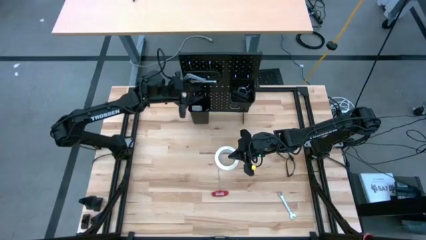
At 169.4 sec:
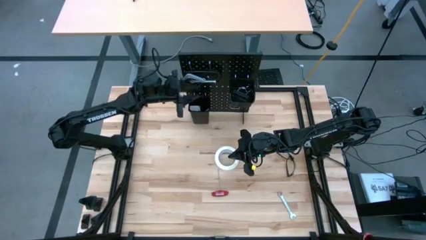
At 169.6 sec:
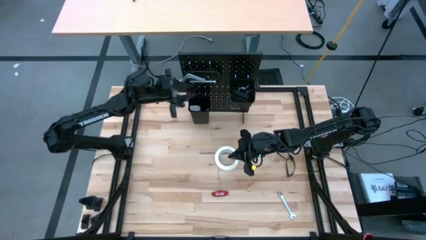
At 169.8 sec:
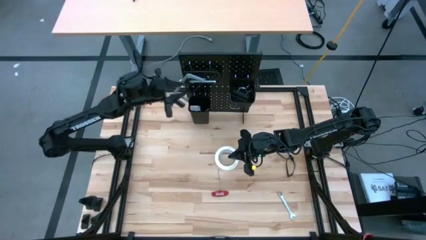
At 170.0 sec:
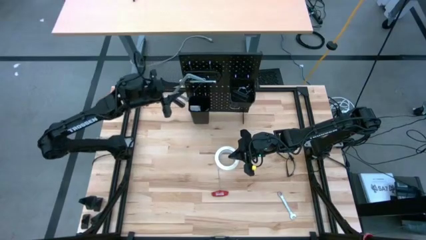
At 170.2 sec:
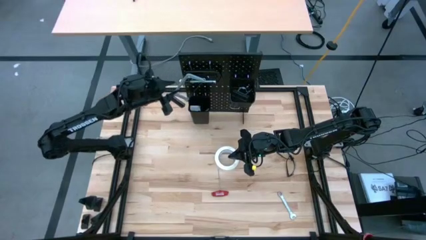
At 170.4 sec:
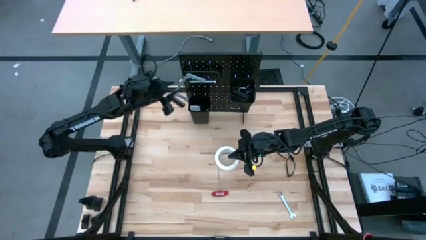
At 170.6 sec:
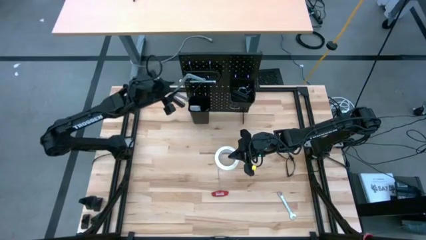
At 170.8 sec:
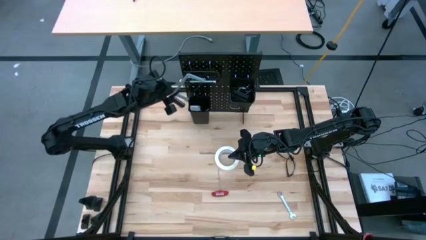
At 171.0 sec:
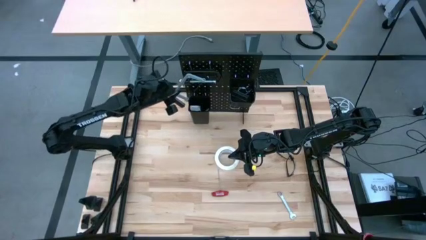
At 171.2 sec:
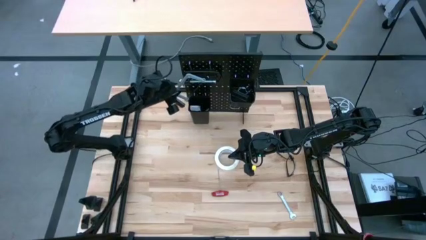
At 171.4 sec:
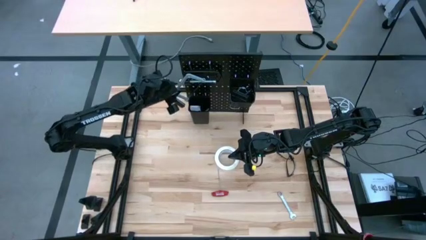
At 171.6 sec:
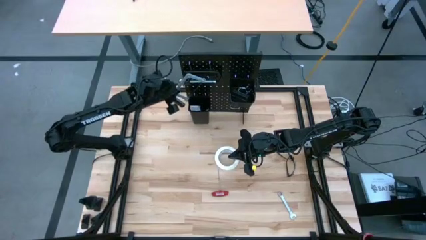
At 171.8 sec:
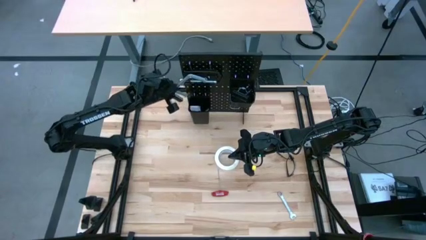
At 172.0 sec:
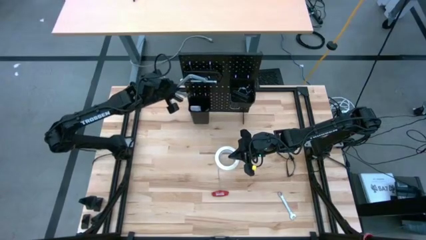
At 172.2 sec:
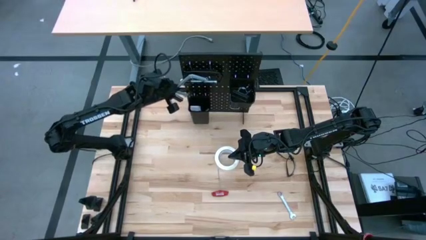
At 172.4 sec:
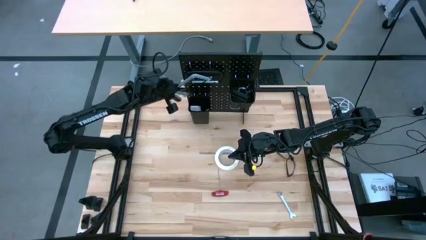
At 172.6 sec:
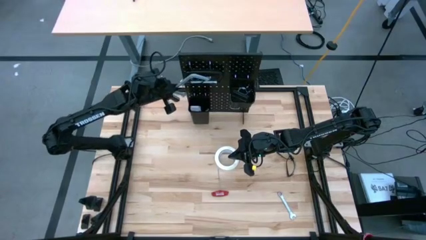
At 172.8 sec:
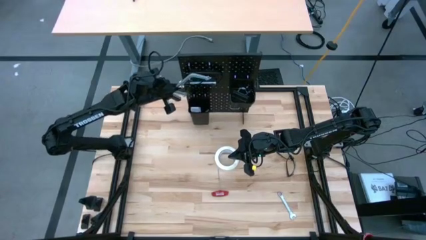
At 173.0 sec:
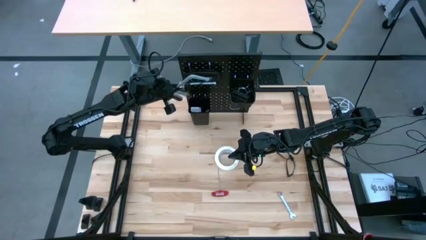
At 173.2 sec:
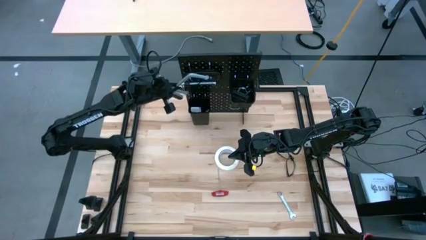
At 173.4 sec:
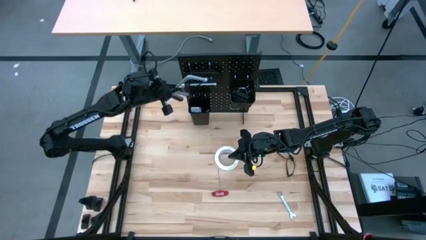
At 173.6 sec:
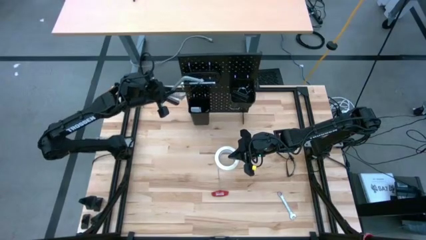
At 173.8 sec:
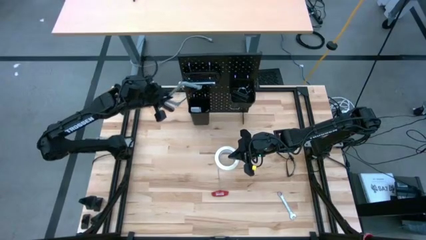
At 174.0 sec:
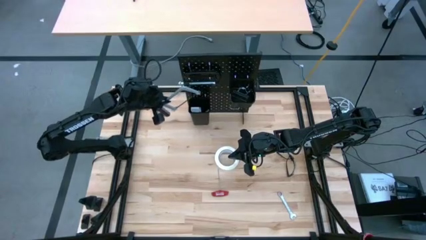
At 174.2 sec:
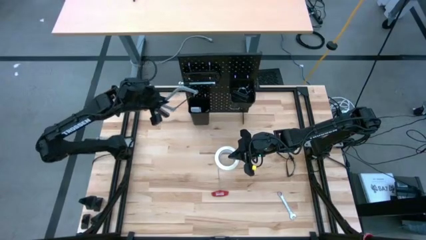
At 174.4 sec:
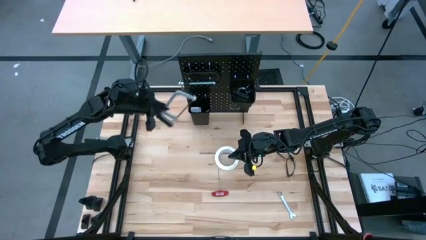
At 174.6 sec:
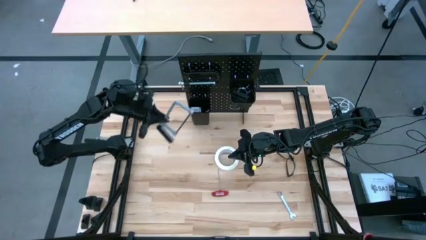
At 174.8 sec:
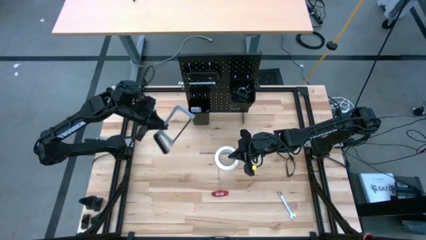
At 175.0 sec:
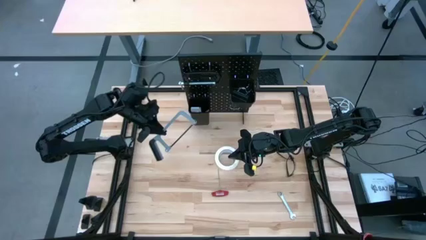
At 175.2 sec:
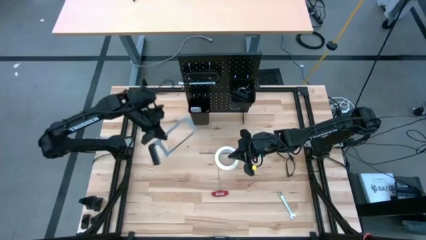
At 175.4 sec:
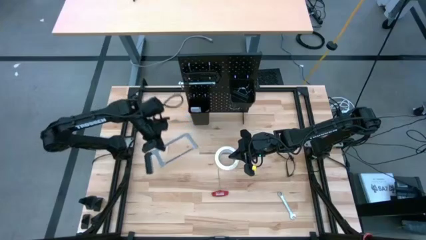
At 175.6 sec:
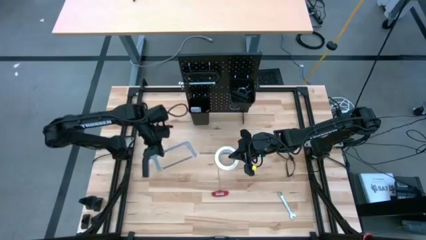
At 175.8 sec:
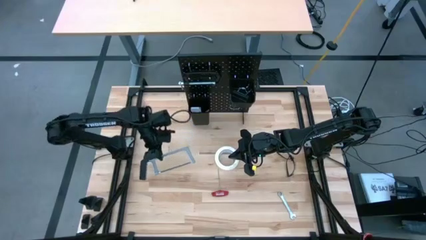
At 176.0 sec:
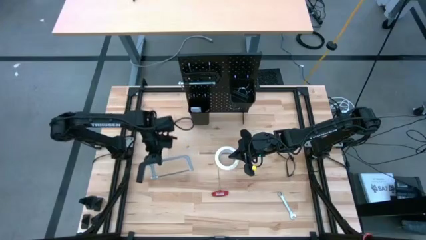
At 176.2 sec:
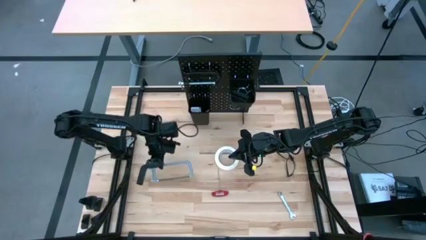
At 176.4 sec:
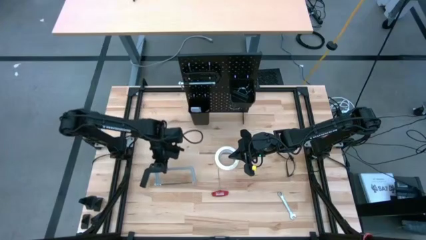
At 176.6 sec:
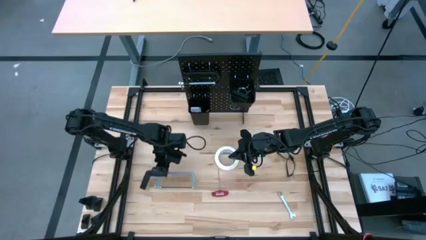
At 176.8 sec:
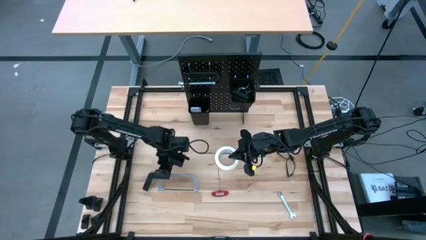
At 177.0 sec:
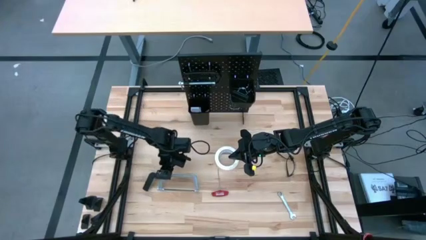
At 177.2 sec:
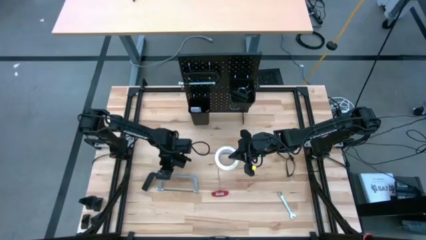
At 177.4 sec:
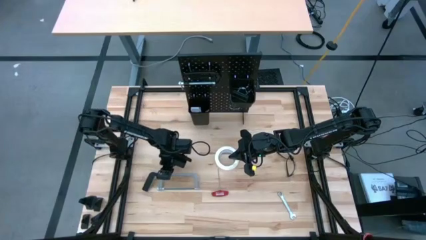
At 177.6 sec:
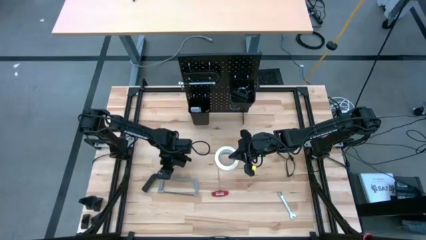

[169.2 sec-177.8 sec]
Task: Hang tools onto peg board
Unhang the gray hacksaw from the black peg board

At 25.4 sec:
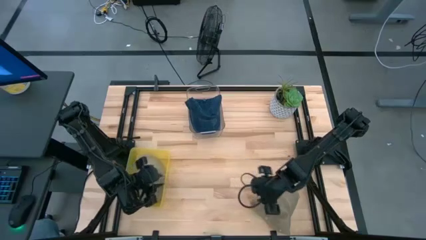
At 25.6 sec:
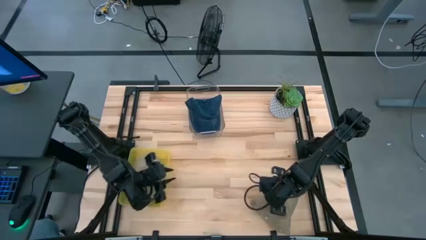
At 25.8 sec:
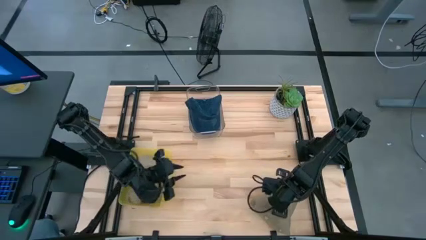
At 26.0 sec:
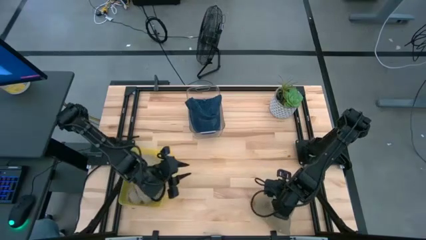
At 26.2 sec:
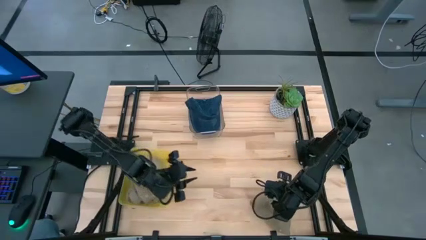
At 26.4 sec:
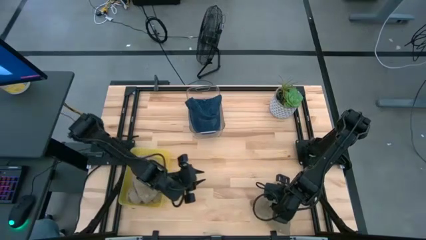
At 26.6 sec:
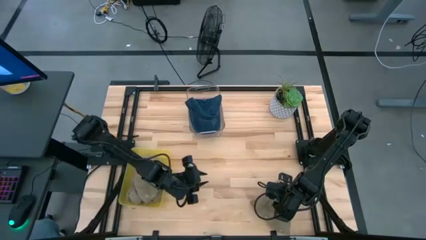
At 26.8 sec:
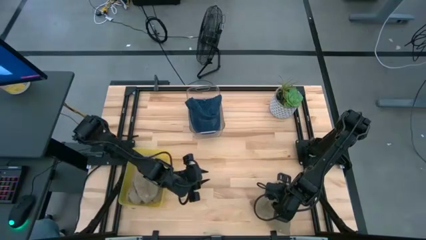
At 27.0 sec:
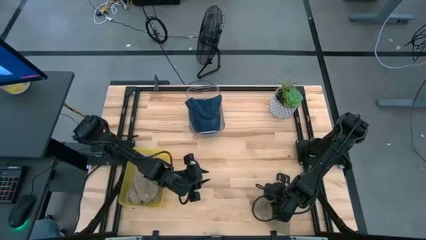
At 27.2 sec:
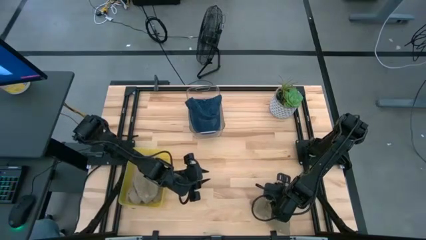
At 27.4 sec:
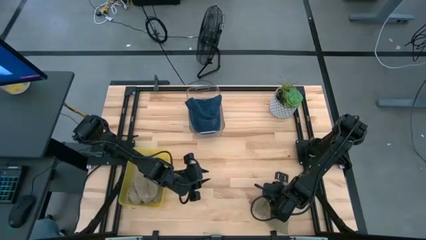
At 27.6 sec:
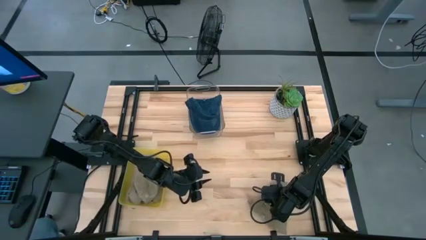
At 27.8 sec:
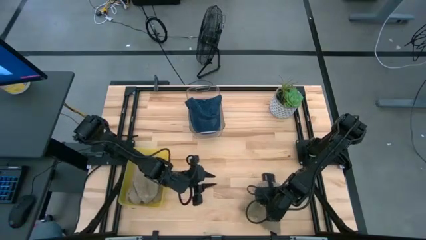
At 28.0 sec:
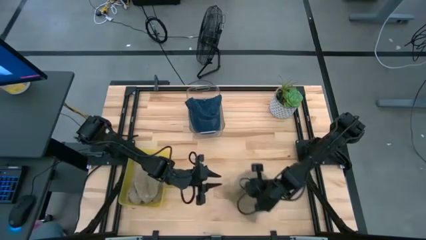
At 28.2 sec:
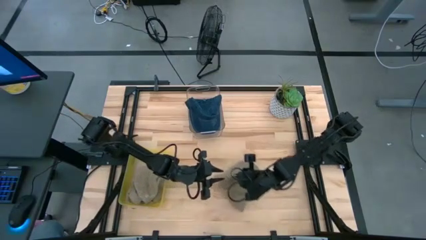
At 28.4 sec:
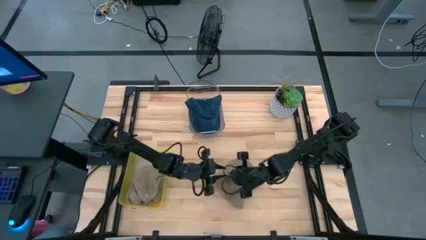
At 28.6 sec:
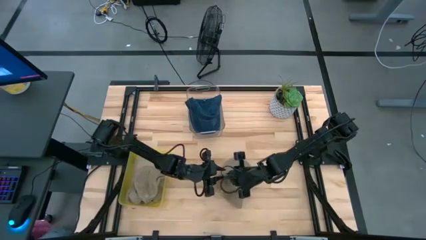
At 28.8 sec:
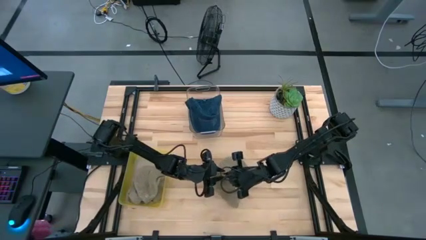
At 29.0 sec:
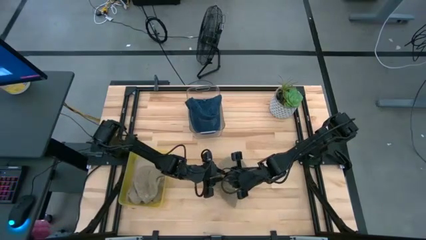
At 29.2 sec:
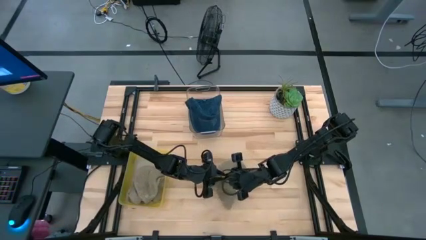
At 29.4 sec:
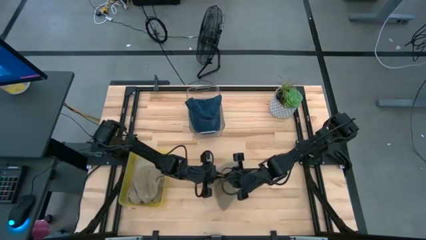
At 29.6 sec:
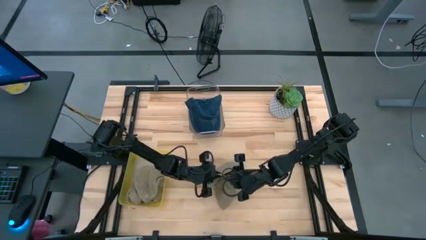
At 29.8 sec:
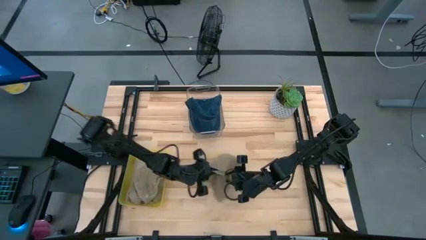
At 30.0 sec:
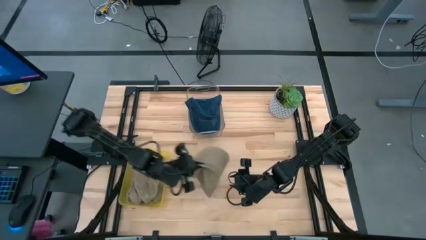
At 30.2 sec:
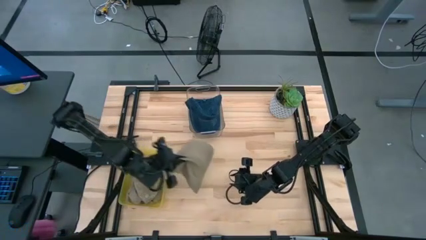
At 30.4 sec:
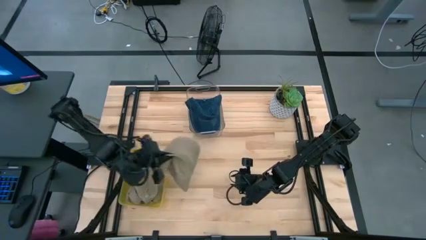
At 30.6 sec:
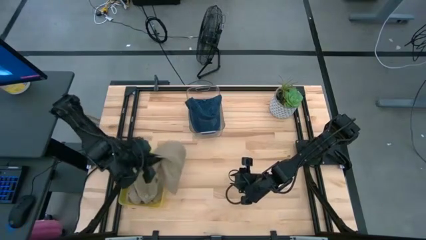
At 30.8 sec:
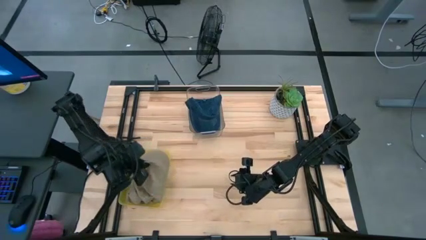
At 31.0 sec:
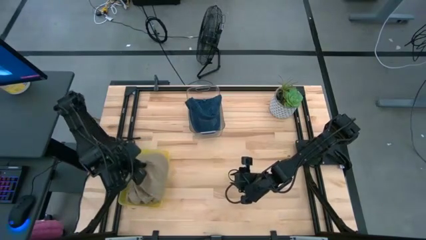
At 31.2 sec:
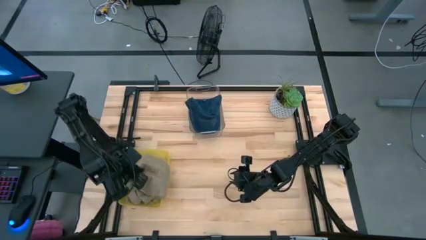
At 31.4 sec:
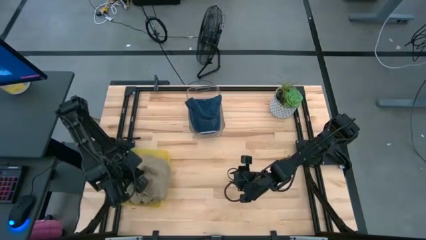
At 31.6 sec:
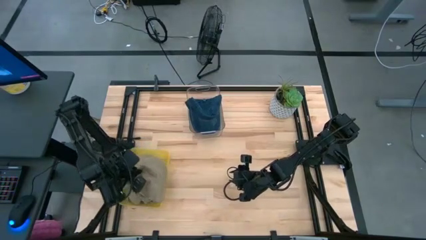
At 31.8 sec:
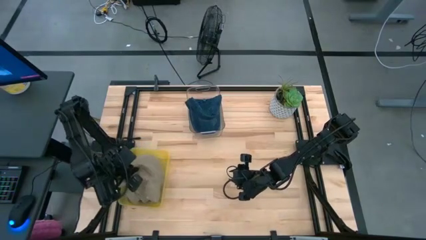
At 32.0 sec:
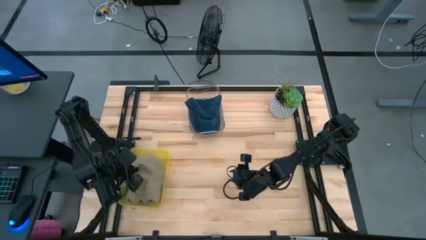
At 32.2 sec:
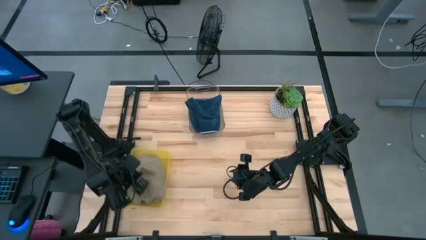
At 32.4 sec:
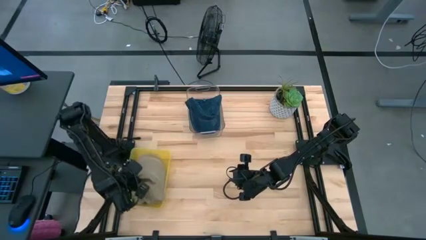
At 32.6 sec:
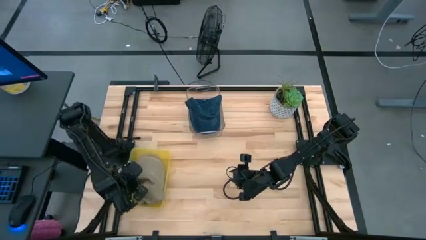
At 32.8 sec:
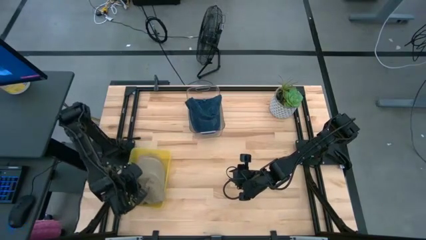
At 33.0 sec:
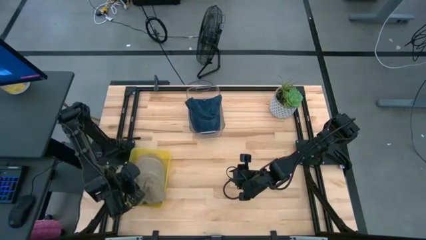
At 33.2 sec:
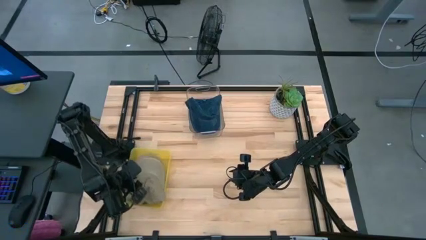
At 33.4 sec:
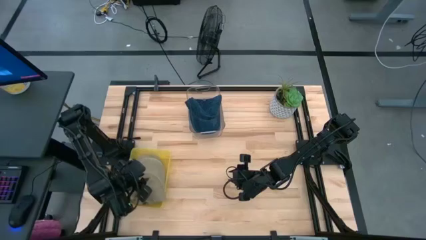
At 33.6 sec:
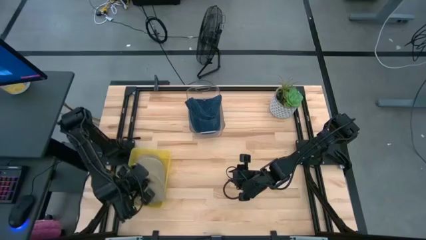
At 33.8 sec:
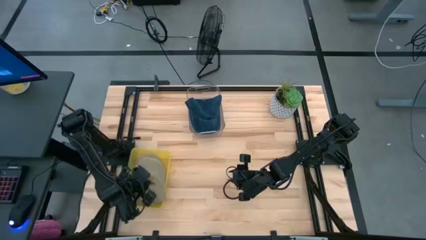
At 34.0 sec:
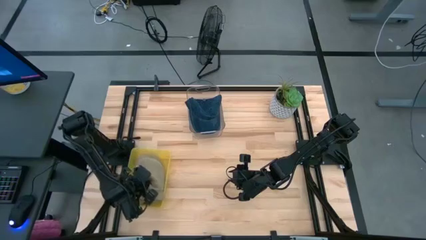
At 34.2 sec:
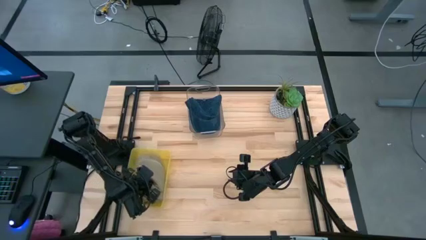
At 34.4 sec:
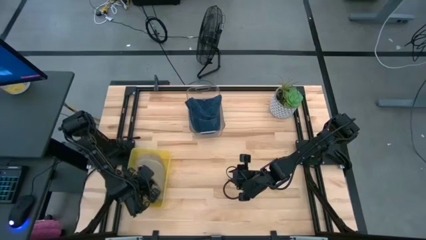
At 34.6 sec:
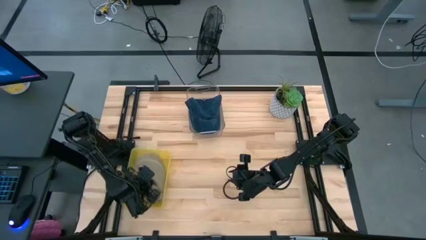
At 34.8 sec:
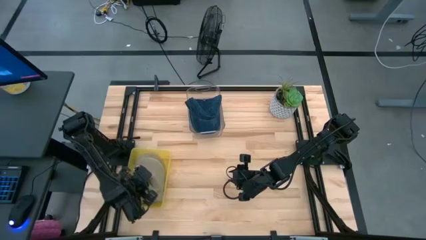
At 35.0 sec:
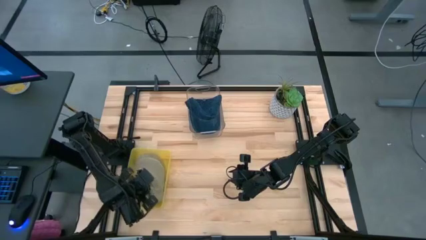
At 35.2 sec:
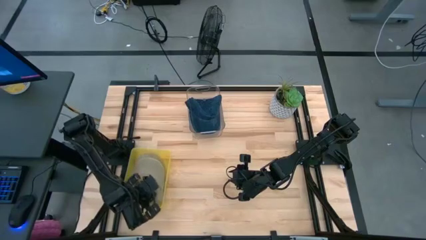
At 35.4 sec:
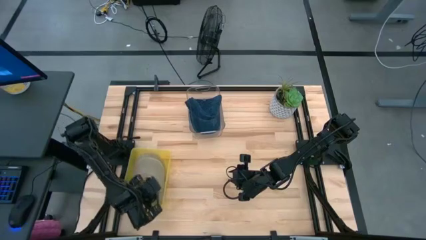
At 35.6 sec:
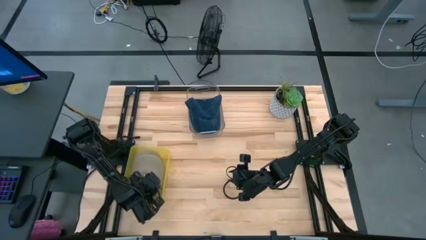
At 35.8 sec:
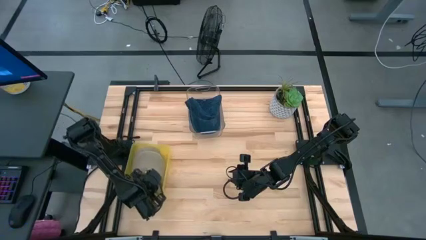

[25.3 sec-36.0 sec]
Task: Pick & Place hat
Put the brown cap into the yellow bin
